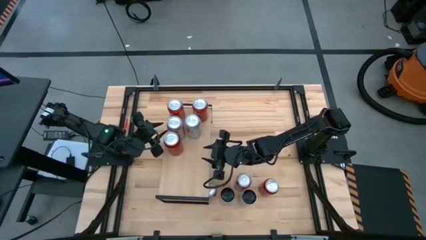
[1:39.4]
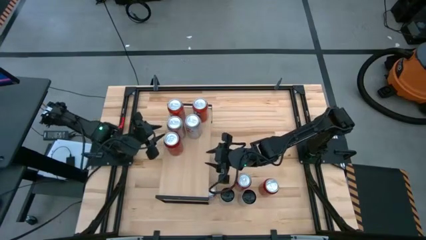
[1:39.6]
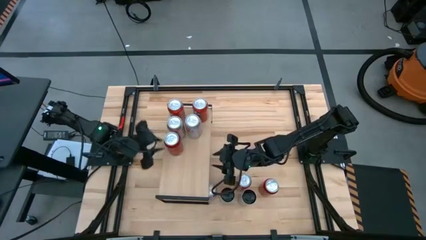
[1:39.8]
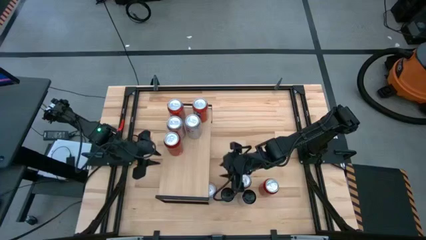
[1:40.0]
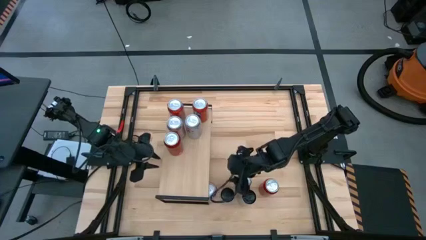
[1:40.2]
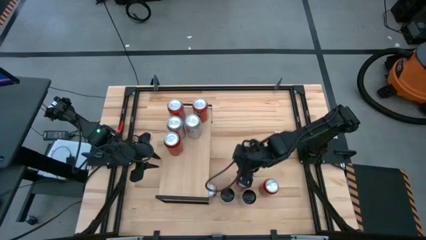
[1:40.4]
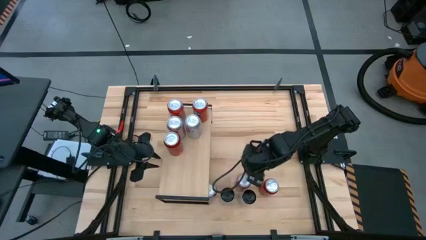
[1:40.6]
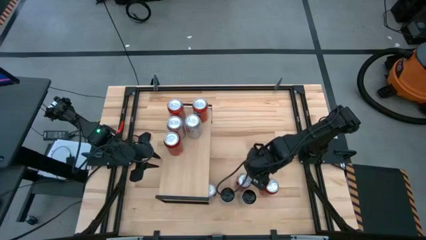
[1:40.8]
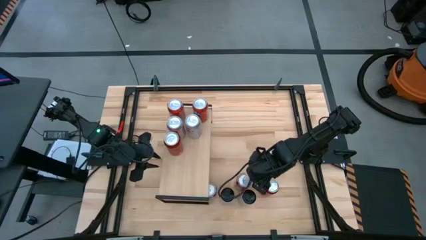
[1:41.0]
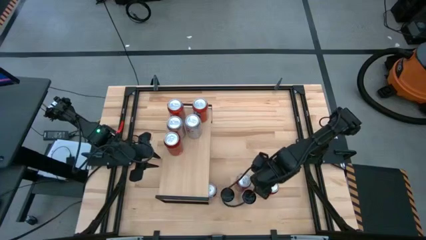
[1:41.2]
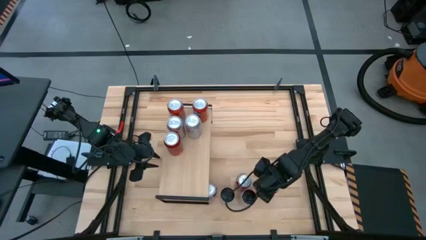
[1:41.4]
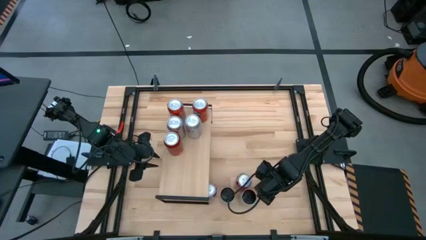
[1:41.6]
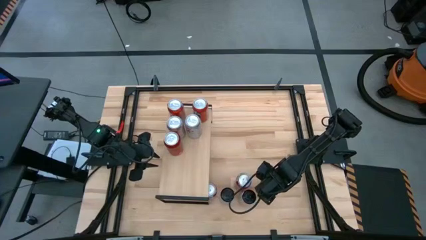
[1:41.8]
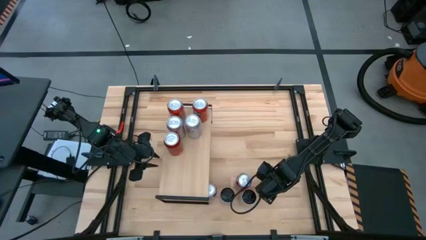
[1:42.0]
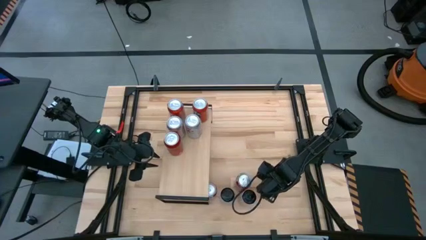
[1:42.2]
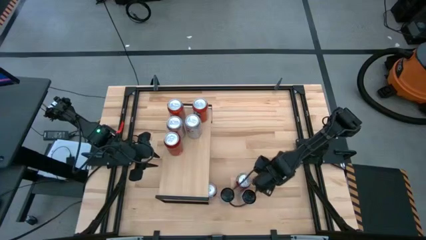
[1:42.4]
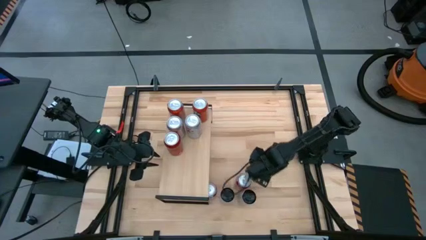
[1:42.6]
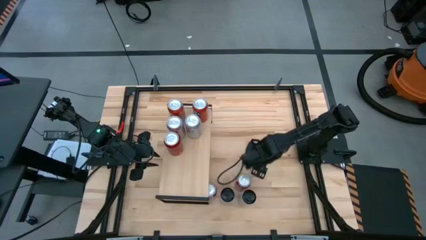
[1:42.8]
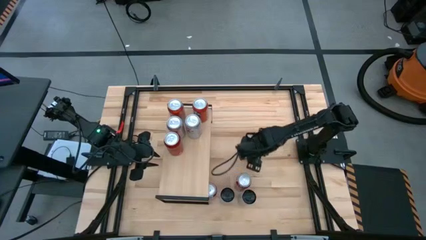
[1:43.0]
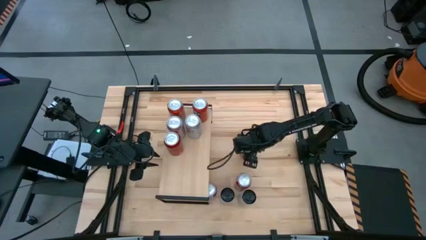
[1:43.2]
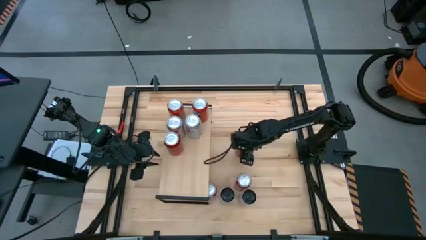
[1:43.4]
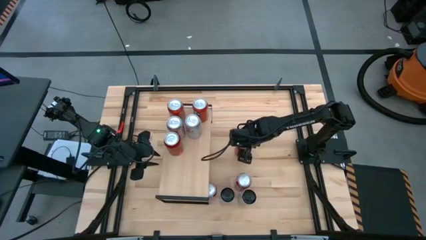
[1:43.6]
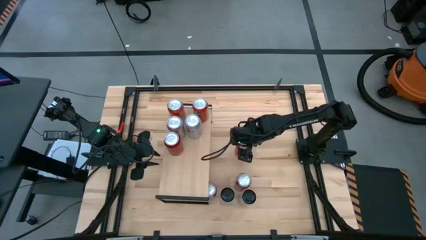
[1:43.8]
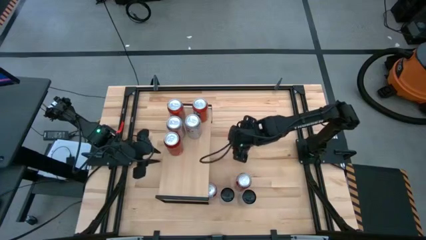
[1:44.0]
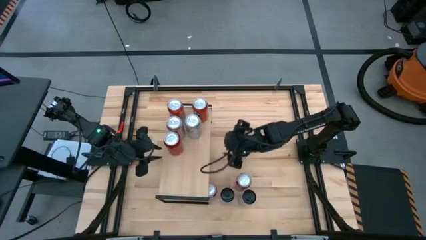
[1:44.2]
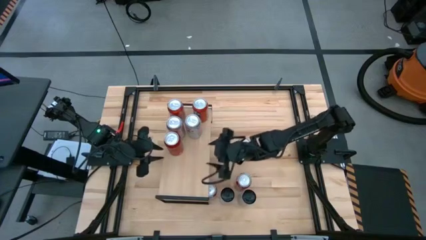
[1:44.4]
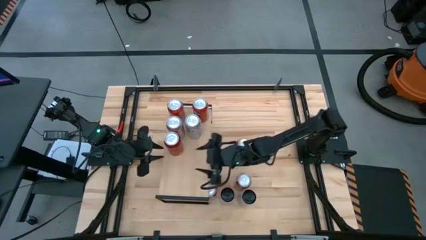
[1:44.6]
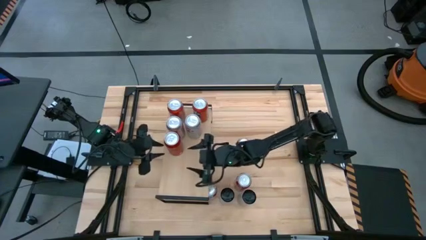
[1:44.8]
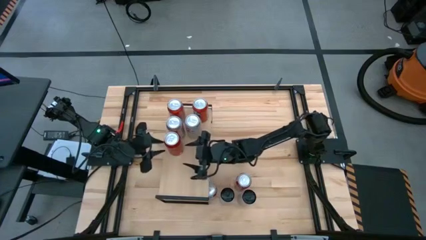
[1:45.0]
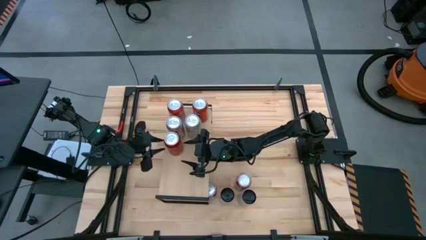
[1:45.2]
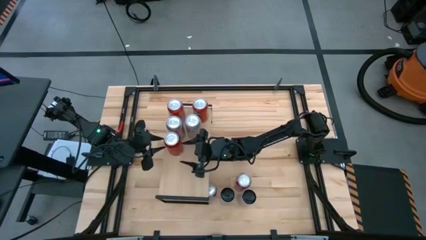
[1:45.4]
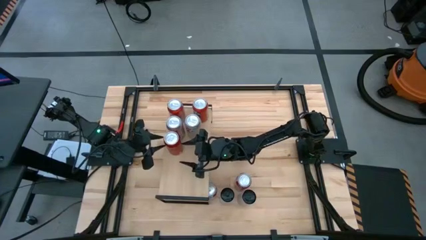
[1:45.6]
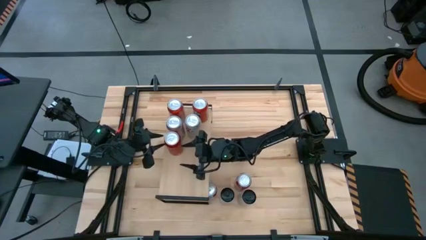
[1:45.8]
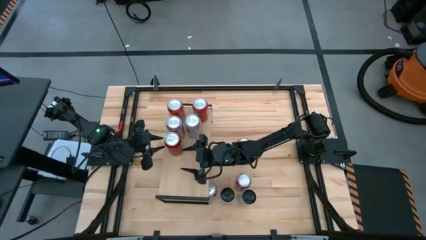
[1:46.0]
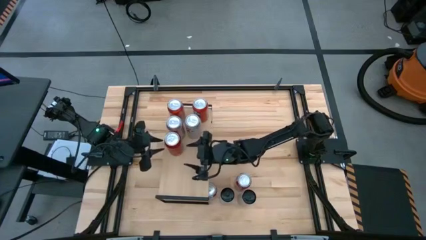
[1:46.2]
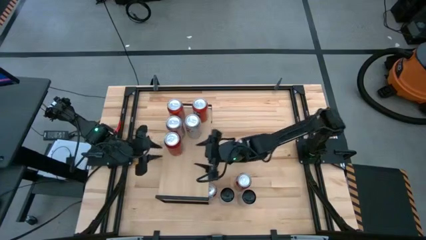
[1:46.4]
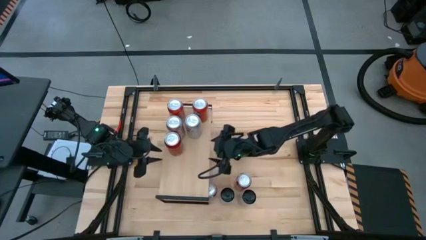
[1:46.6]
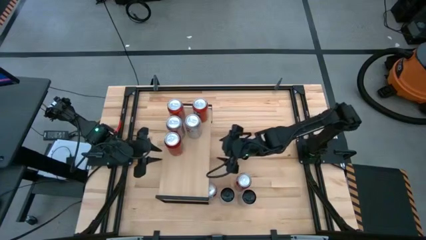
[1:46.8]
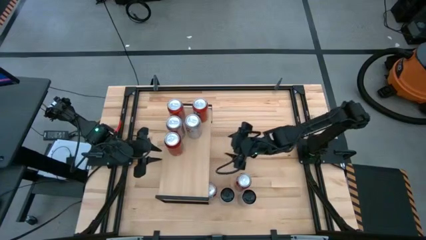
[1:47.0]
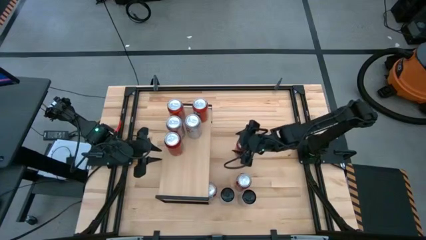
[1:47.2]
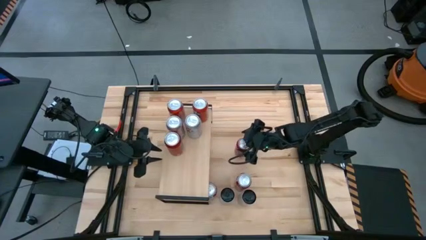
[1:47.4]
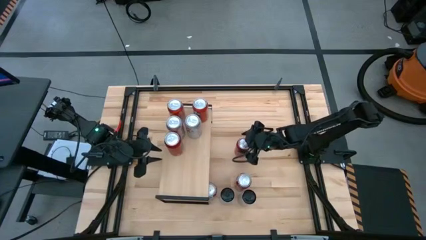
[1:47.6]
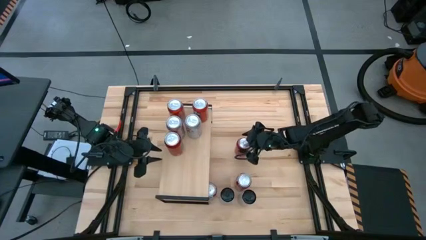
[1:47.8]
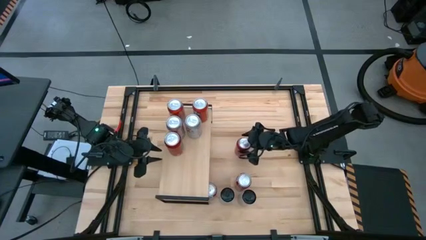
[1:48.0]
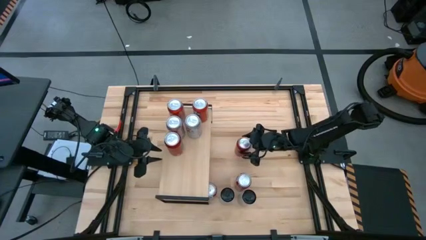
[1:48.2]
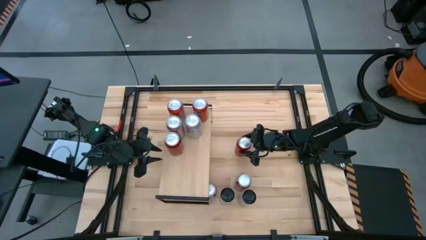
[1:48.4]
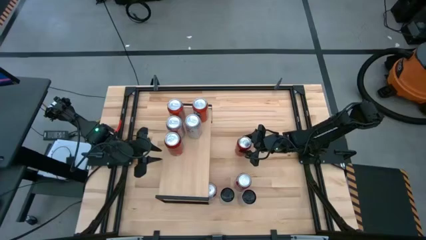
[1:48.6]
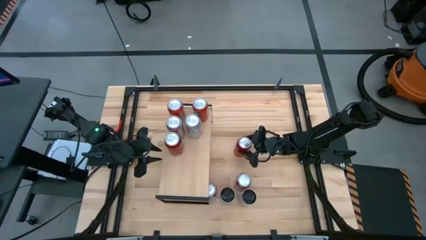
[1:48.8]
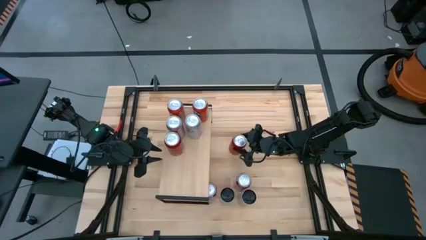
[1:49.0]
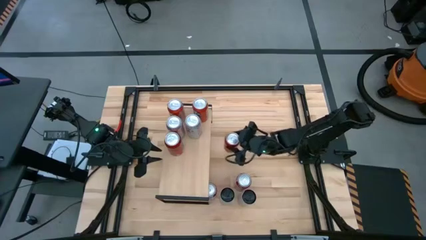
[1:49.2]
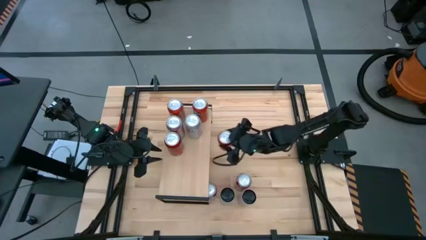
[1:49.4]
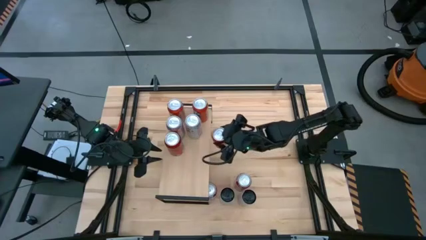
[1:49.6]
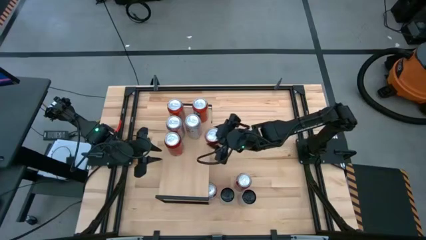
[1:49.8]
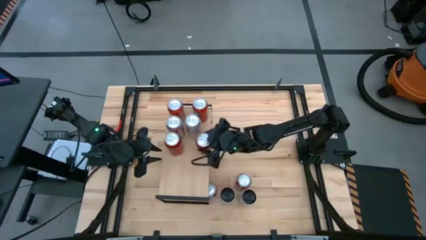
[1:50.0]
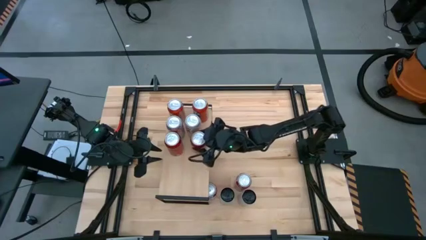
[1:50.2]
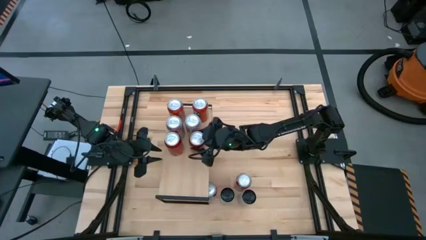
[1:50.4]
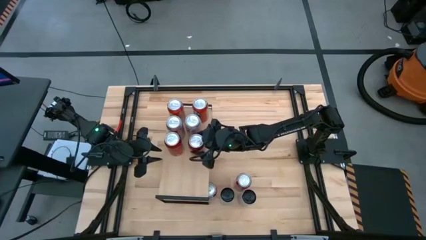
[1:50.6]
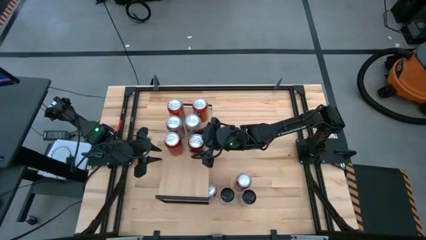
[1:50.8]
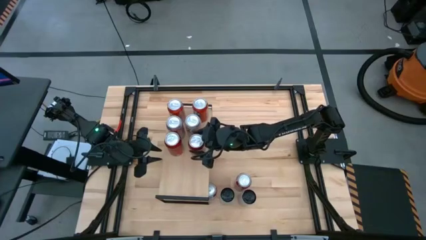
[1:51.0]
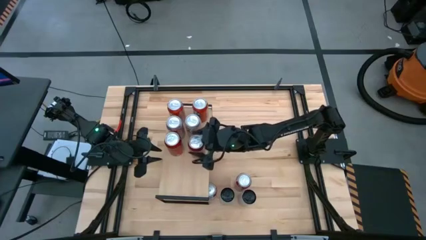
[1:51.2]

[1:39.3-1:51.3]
Task: Place canned beverage on shelf
Put the red black soda can on the shelf aligned with the other red soda can

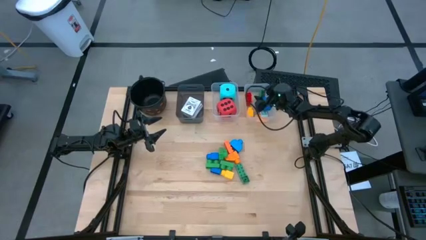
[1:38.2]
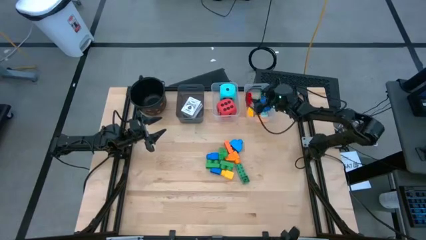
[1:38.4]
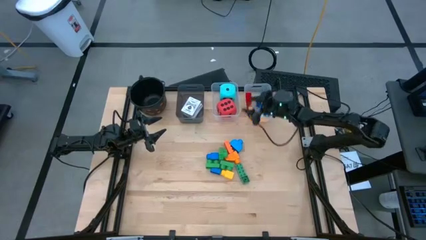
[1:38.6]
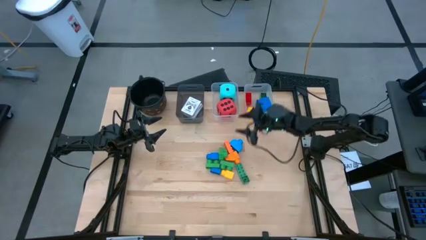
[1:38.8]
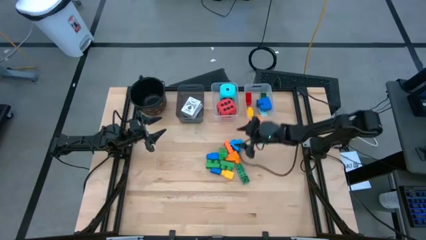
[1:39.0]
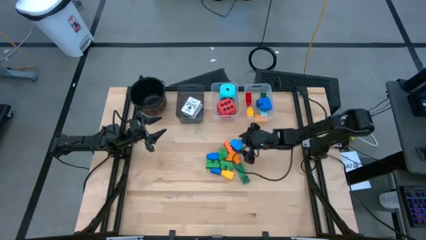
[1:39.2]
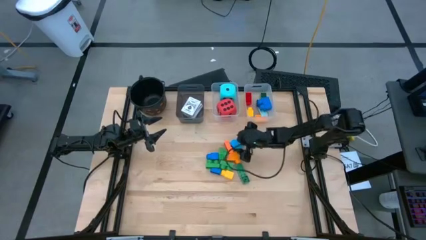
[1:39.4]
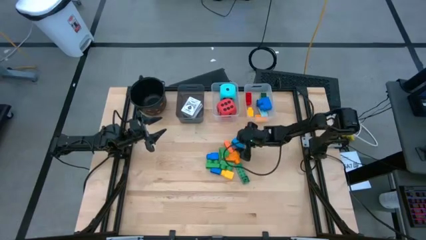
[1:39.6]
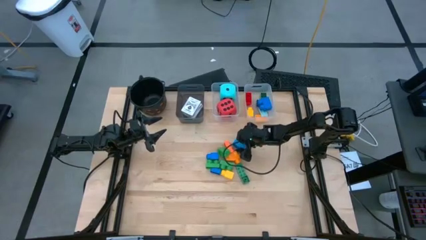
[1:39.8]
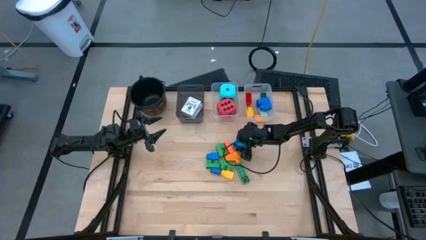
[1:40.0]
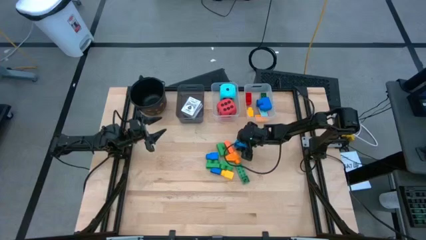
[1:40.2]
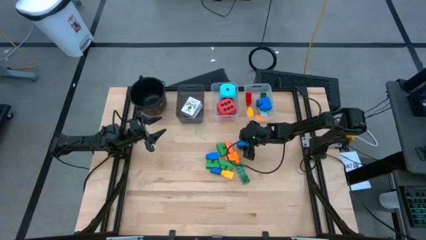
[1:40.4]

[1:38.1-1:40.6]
Task: Pick & Place Toys
Put the right blue one stud into the right transparent bin

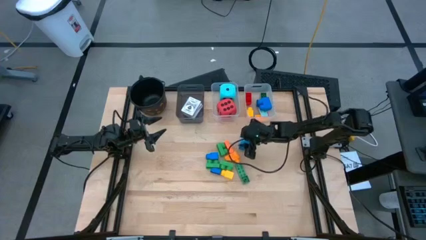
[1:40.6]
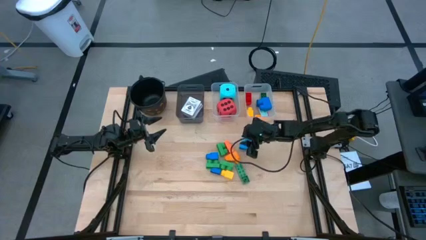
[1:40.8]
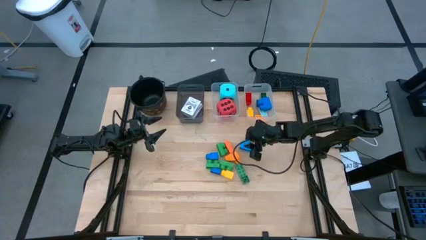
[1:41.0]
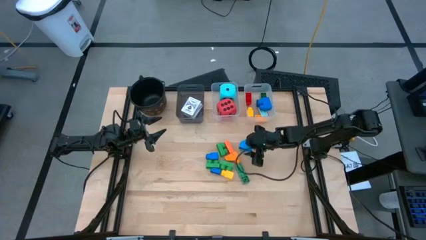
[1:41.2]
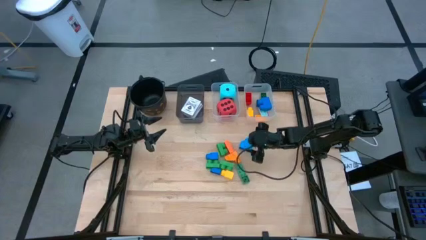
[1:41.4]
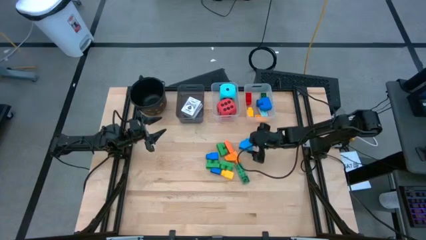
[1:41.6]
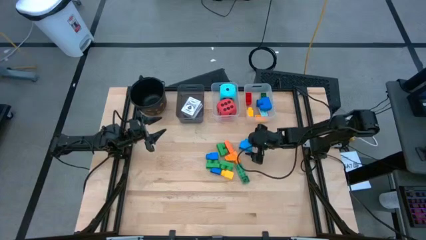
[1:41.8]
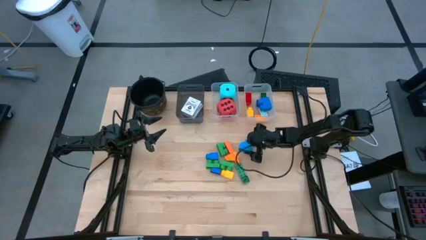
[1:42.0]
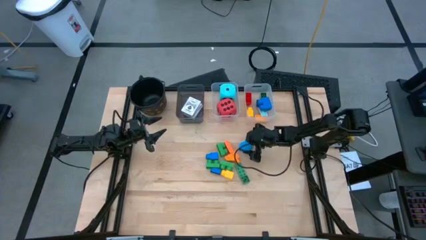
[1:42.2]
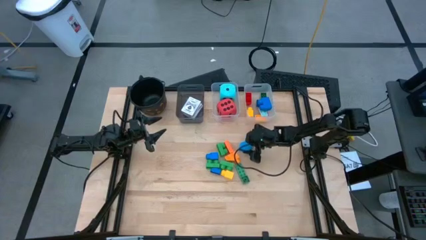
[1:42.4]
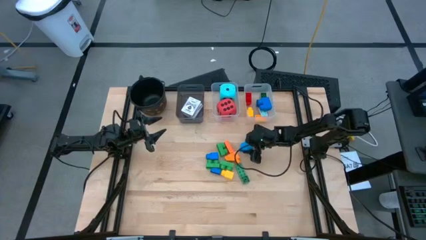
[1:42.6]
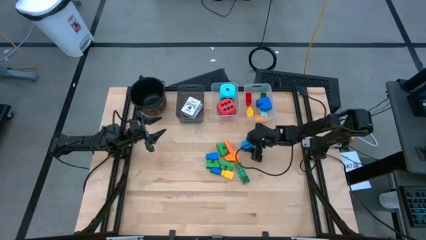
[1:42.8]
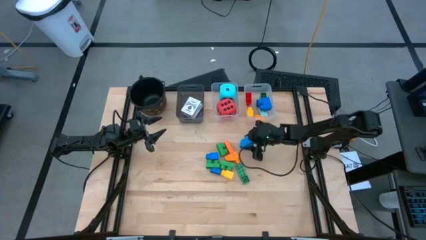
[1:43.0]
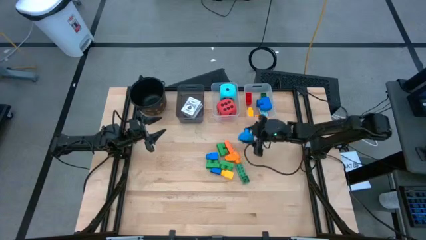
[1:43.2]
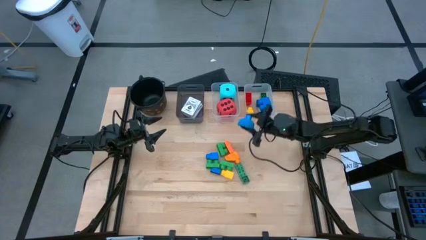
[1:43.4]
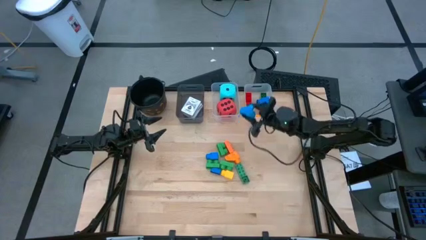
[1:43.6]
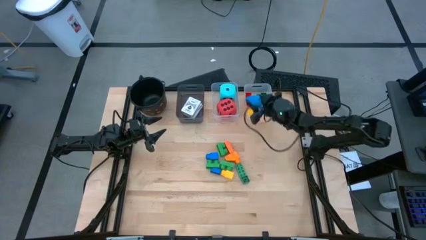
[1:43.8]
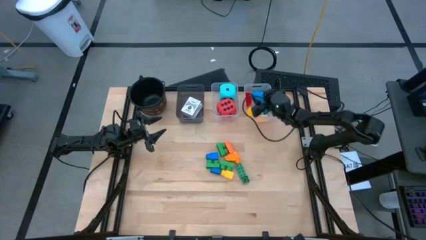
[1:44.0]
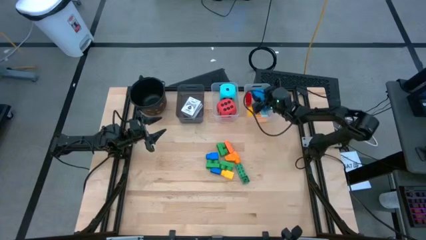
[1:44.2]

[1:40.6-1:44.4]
Put the right blue one stud into the right transparent bin
